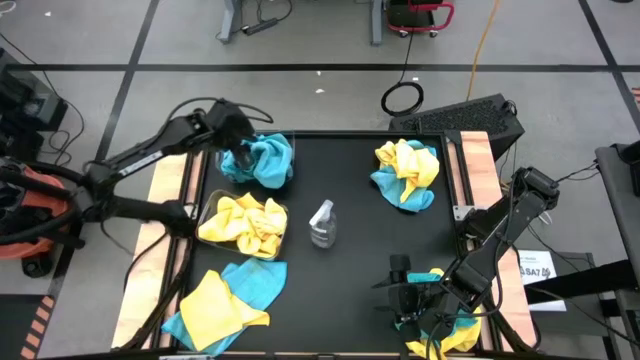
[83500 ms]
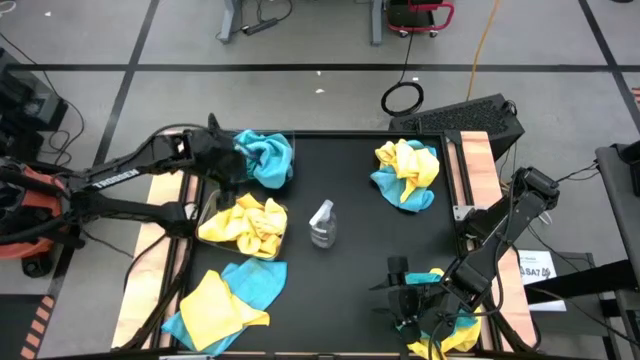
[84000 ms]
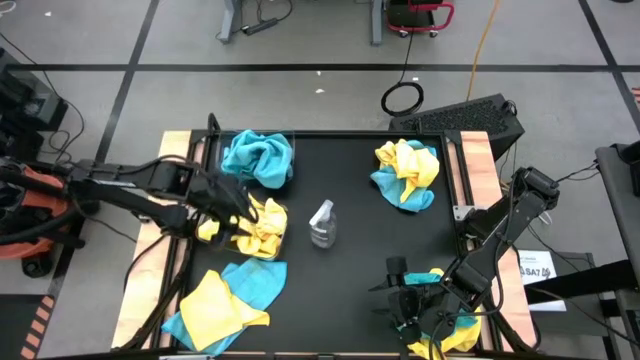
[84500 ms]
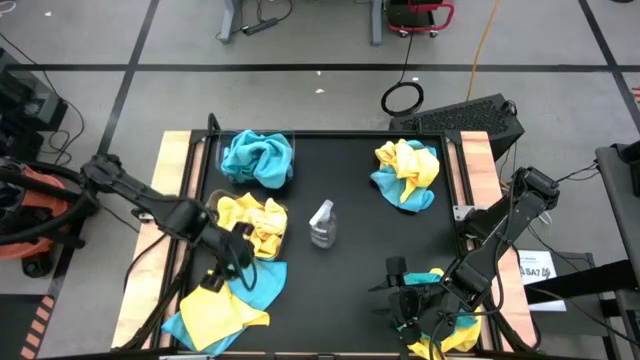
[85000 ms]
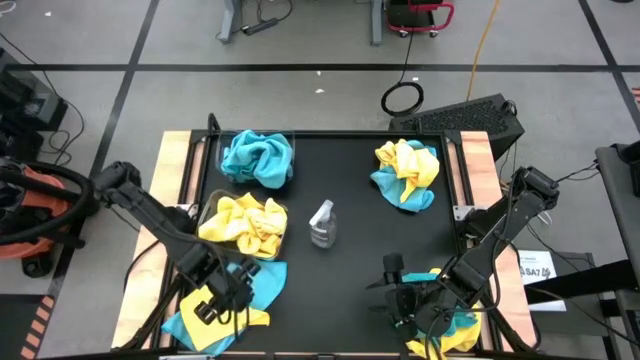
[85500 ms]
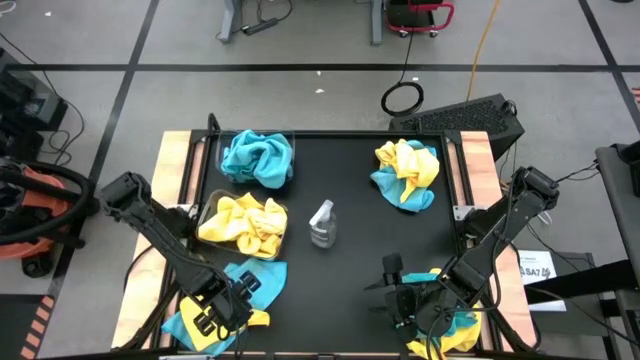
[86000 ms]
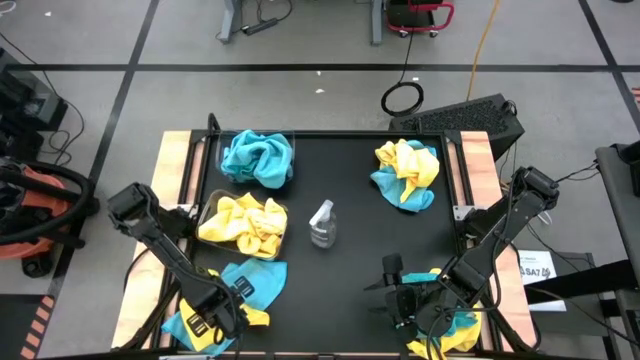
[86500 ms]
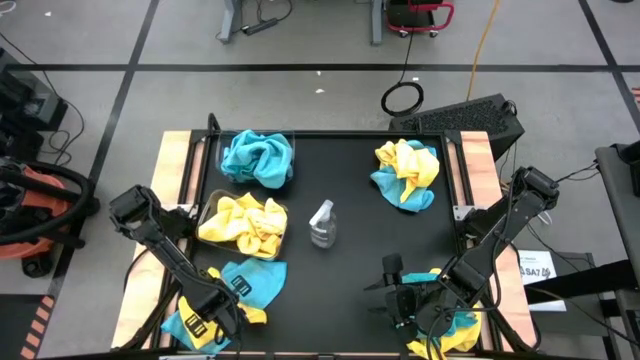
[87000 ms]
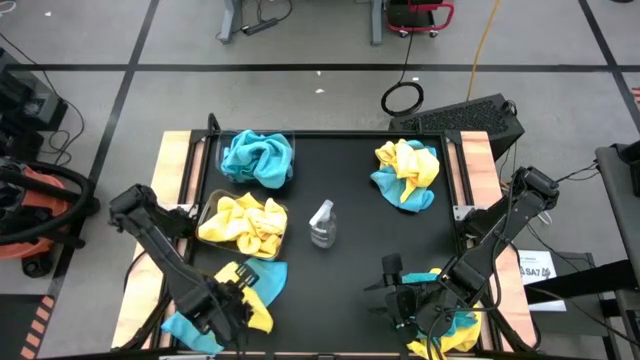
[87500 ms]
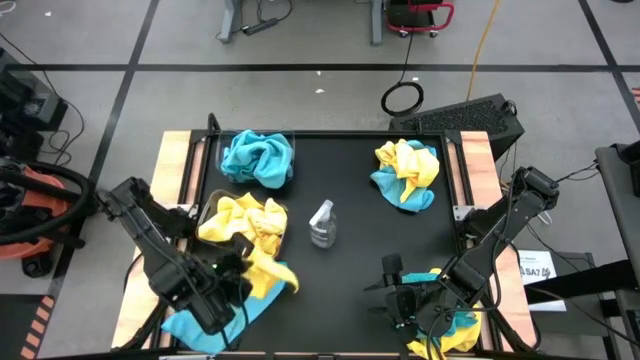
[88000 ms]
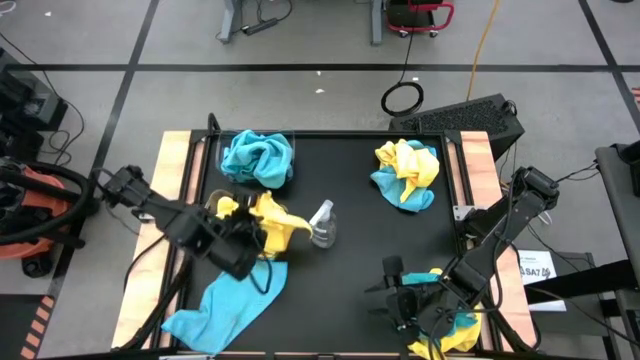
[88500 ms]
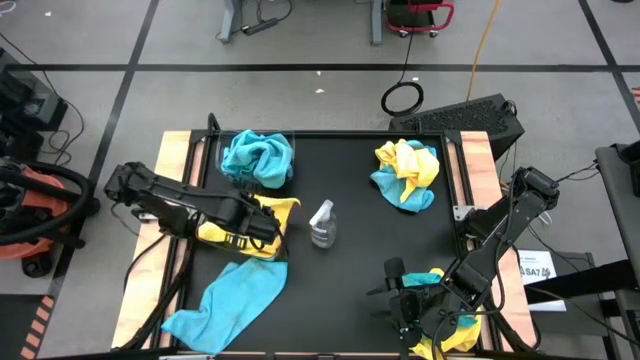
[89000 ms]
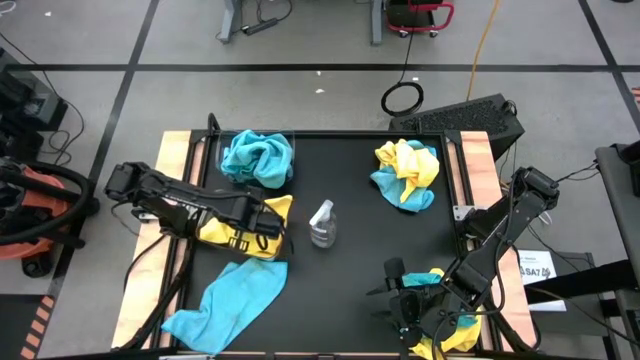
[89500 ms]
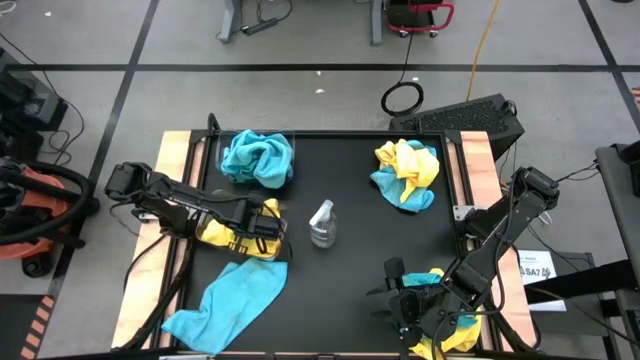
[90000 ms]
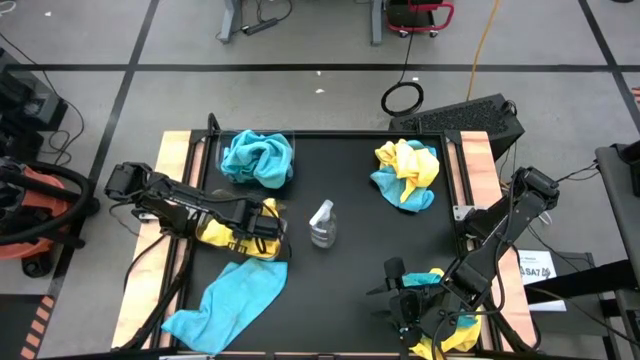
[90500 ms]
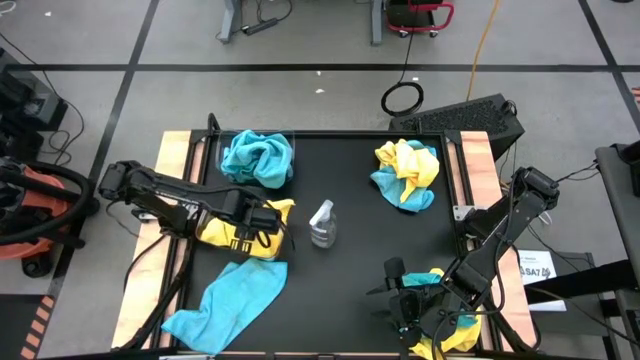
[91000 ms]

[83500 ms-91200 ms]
Task: Sort microfiber towel by color & place in baskets
Put the yellow microfiber cloth into the bottom transparent bin

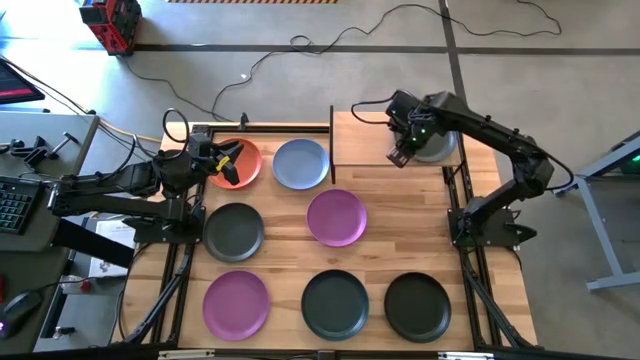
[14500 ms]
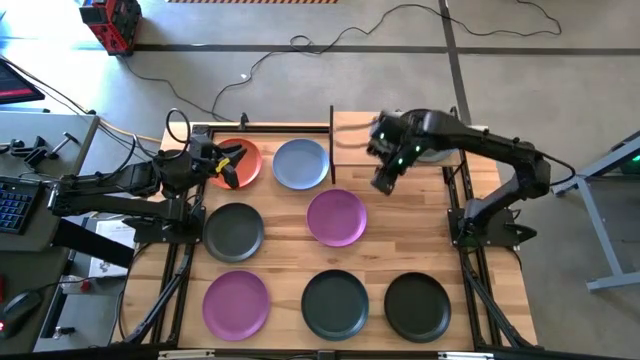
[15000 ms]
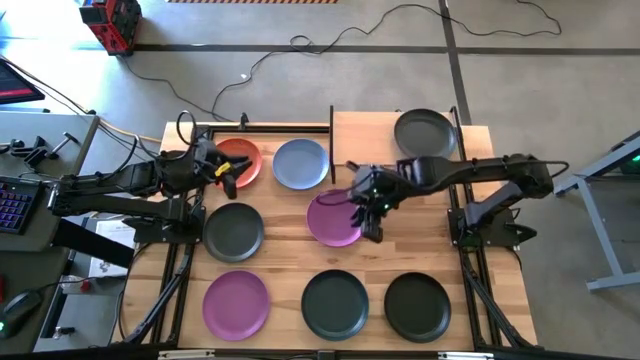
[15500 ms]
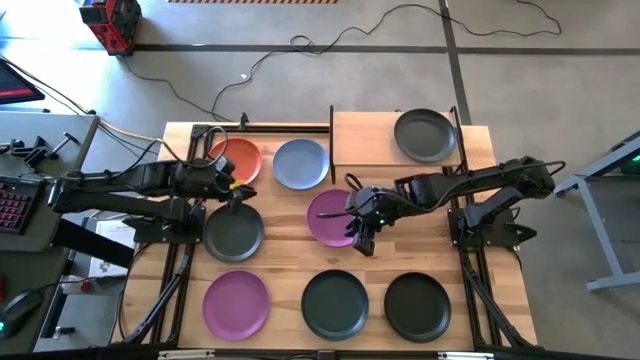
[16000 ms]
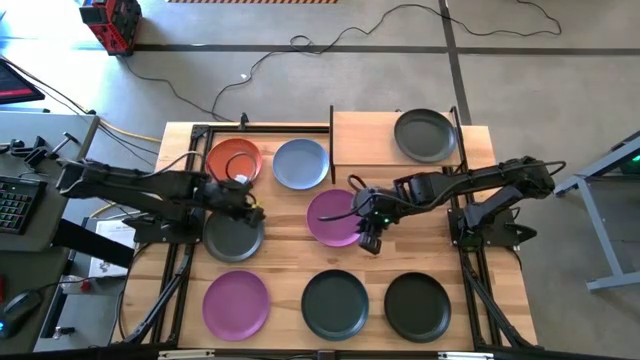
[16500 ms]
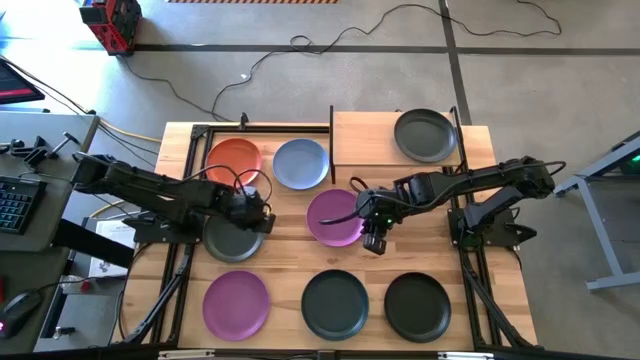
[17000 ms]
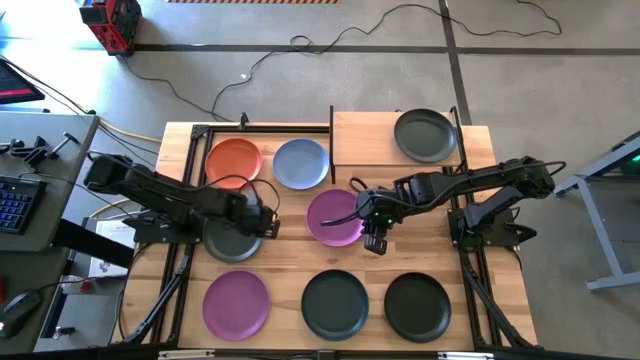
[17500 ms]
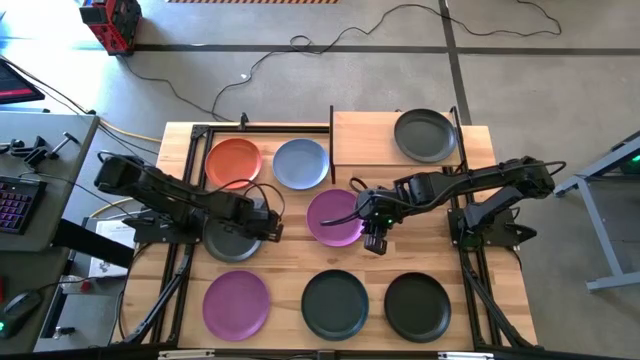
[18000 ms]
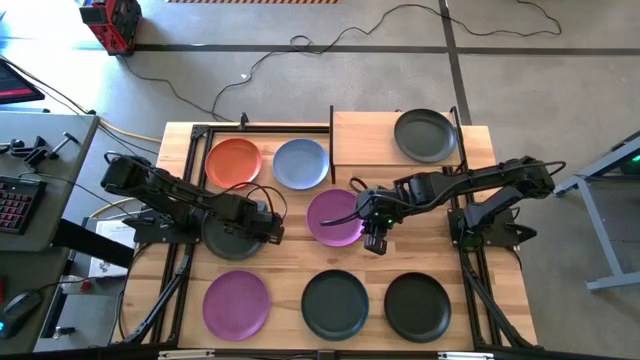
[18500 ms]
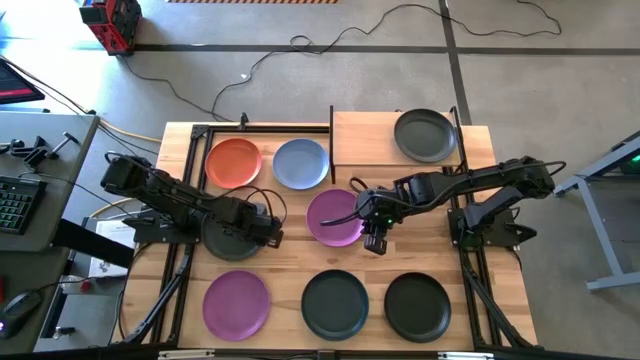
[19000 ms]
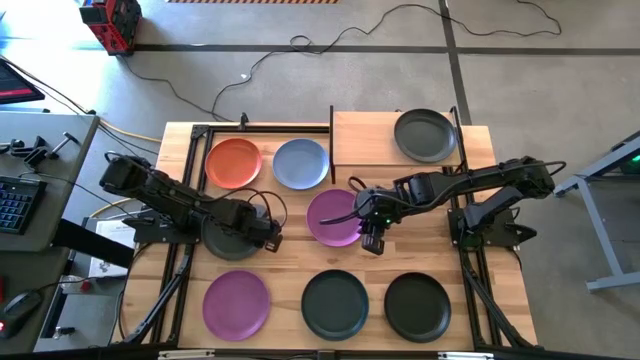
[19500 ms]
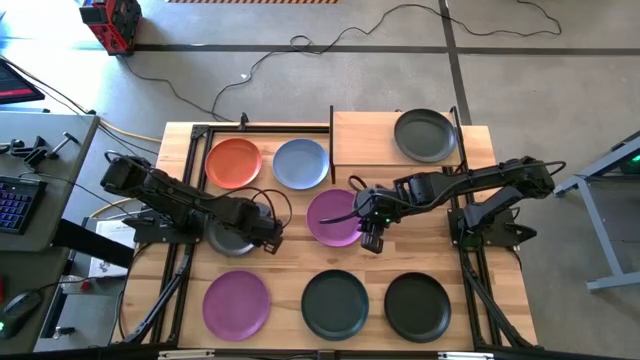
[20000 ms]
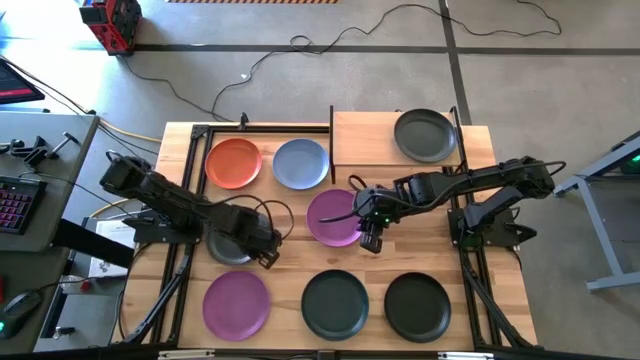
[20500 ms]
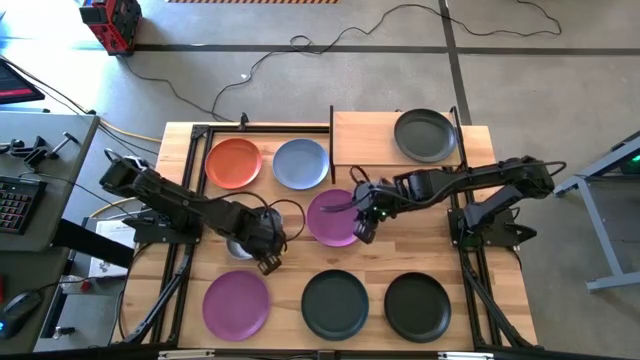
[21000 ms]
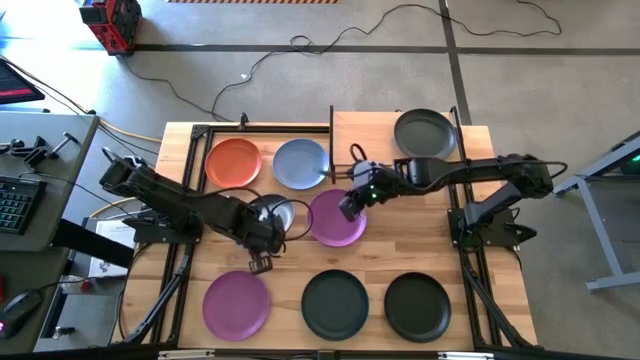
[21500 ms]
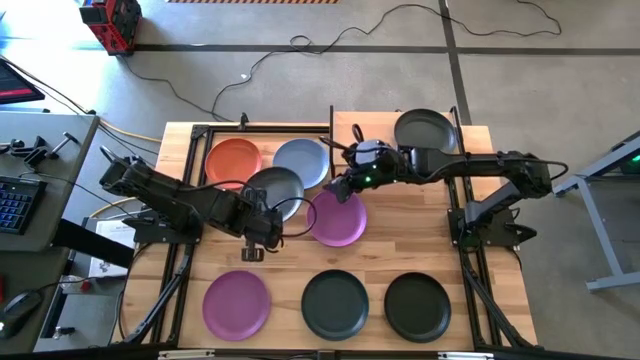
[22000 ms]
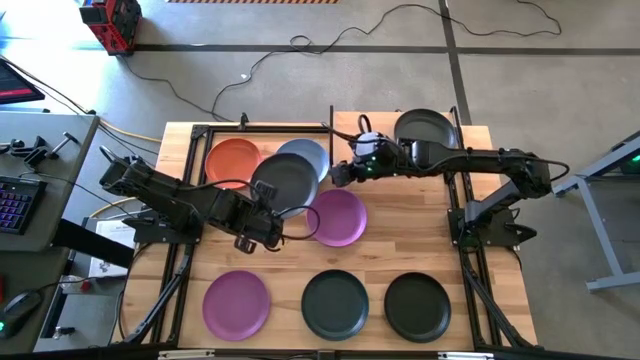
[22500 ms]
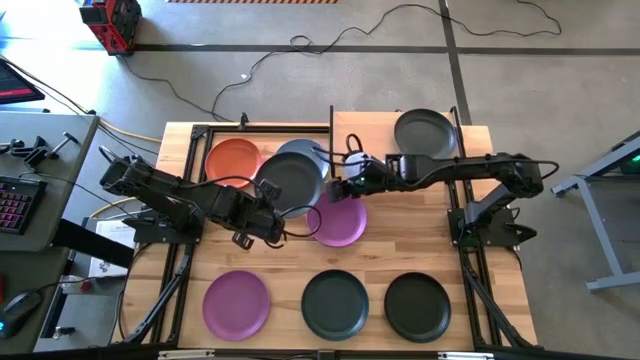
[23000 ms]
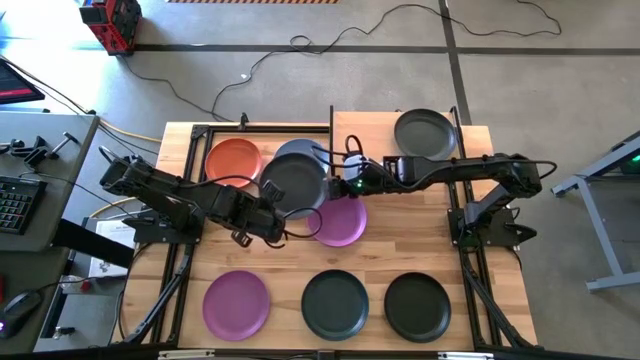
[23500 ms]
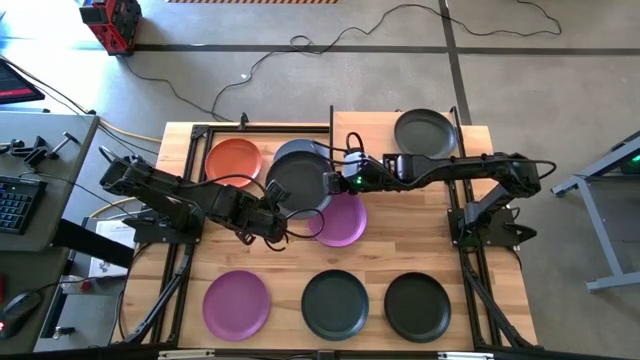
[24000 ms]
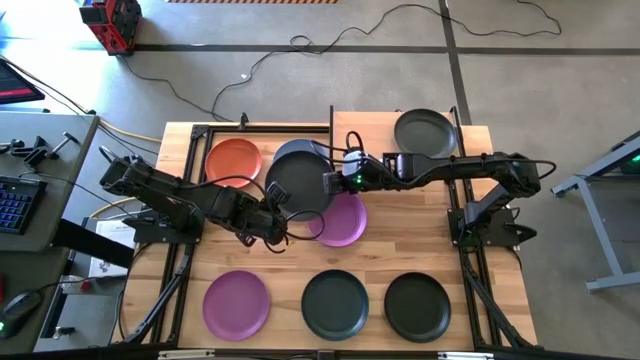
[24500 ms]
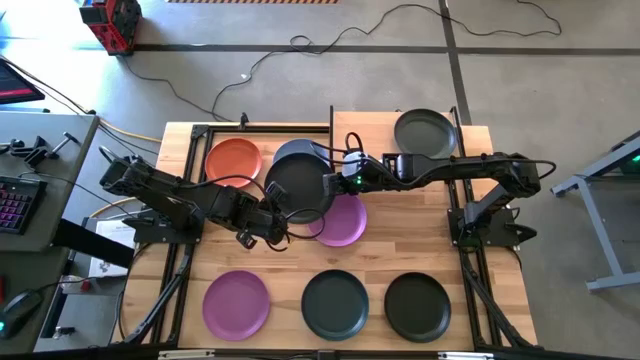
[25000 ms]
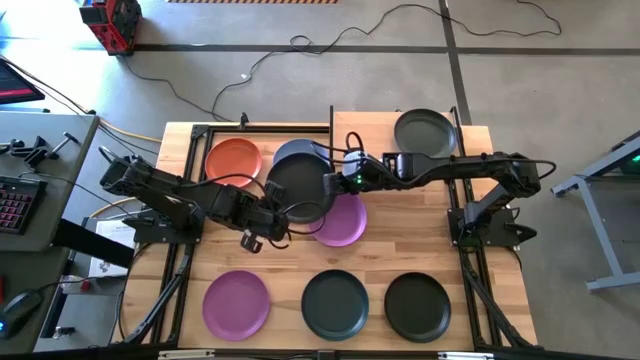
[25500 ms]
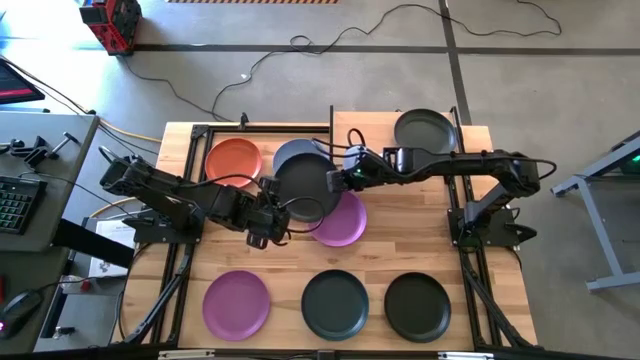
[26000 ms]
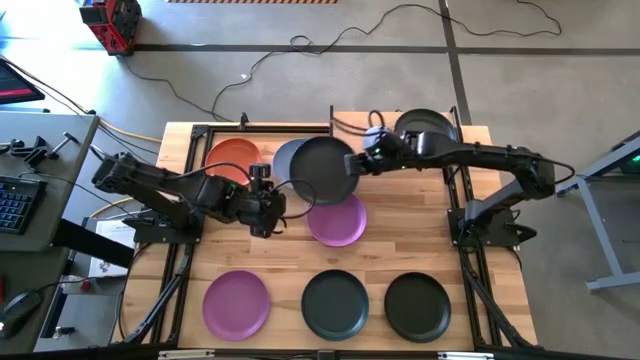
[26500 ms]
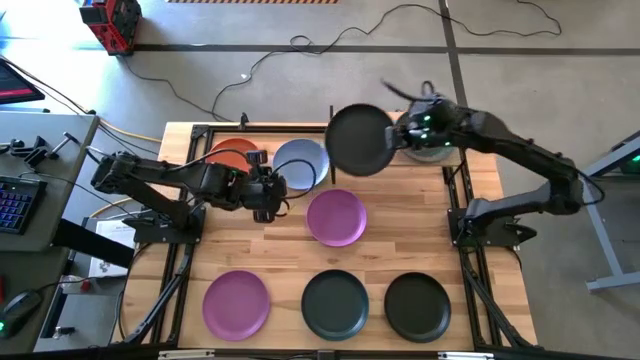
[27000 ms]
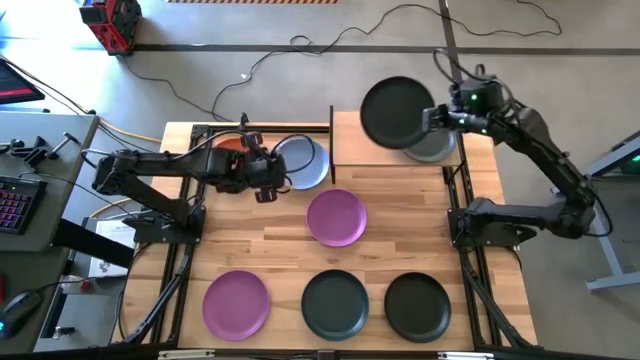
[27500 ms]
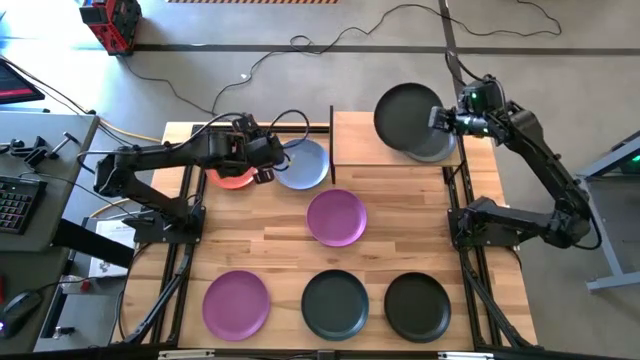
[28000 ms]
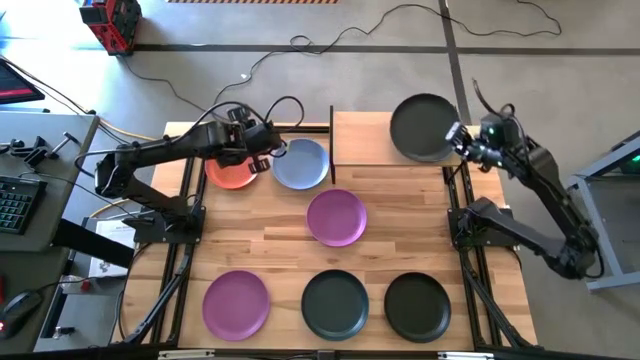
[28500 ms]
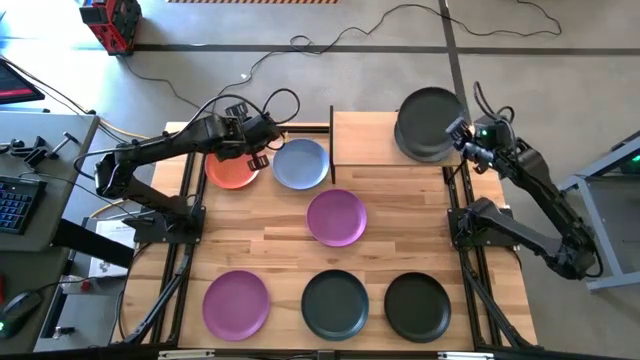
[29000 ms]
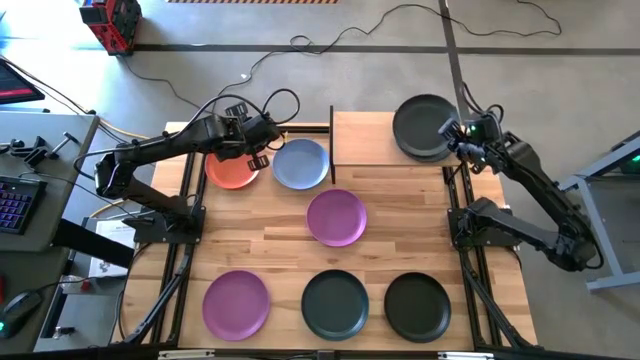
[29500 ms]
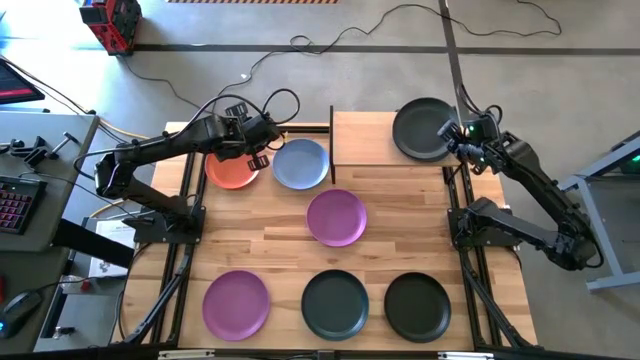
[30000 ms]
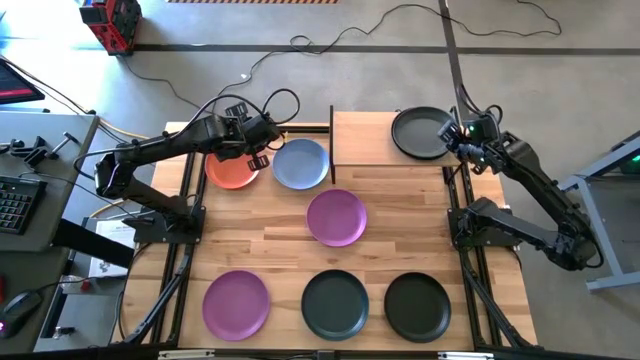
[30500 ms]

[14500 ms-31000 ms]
Task: Place and stack plates onto a shelf
Stack the top black plate on top of the other black plate on the shelf
